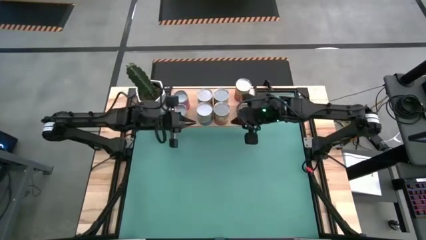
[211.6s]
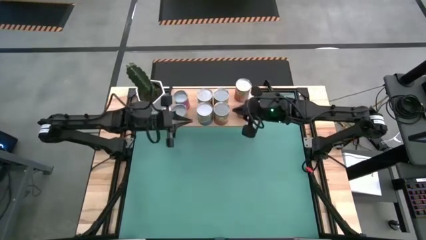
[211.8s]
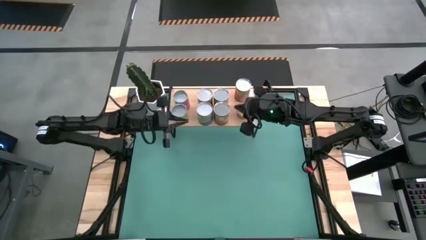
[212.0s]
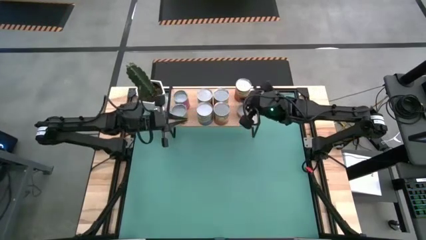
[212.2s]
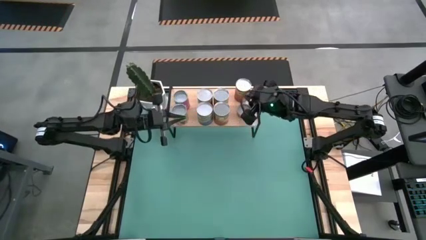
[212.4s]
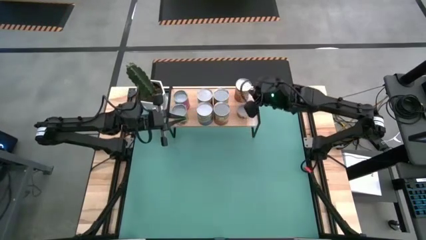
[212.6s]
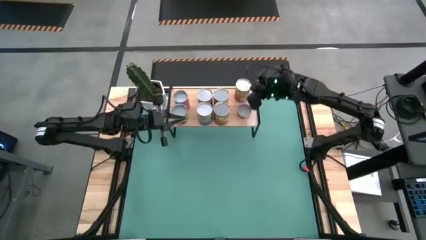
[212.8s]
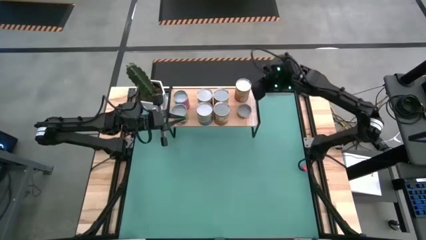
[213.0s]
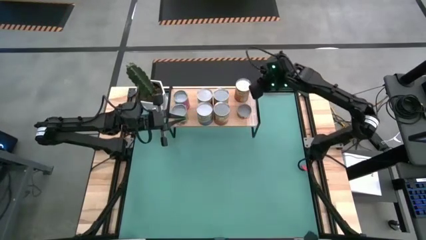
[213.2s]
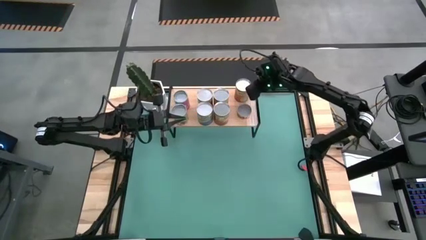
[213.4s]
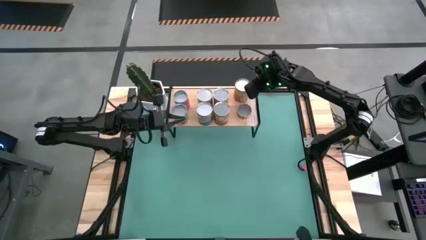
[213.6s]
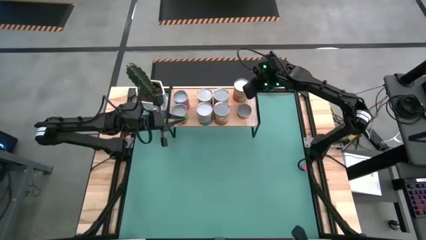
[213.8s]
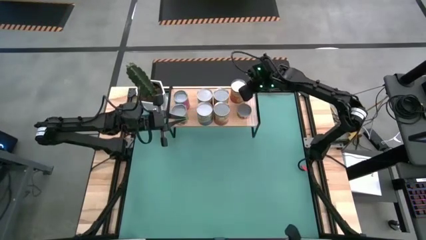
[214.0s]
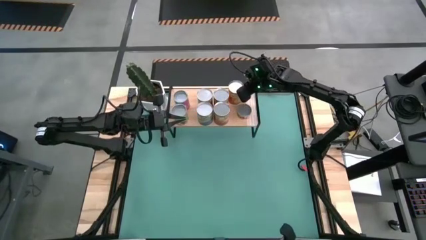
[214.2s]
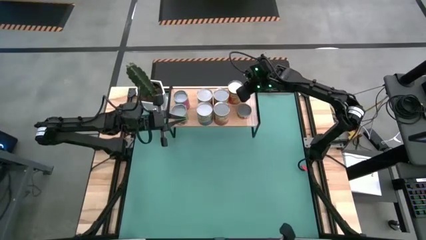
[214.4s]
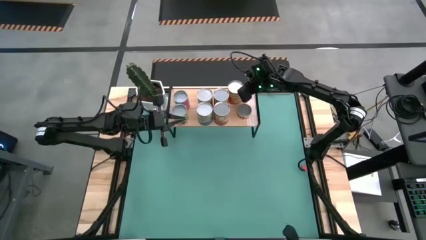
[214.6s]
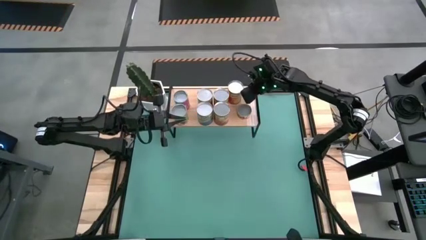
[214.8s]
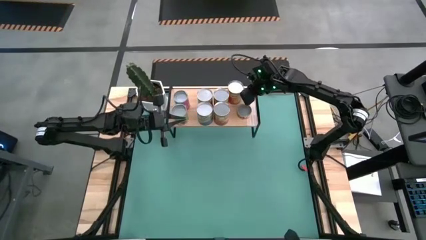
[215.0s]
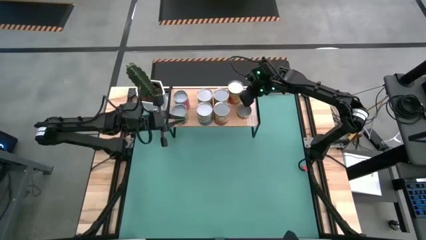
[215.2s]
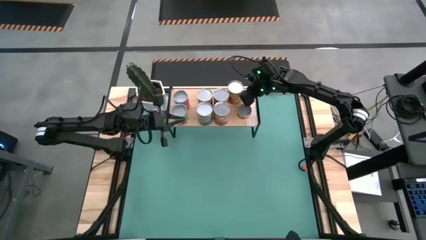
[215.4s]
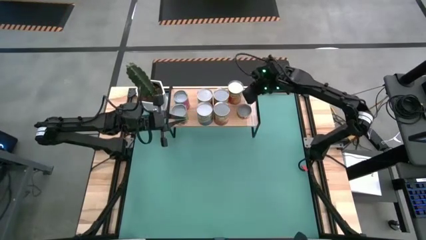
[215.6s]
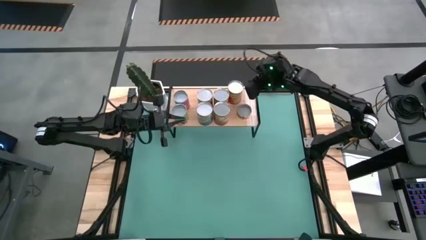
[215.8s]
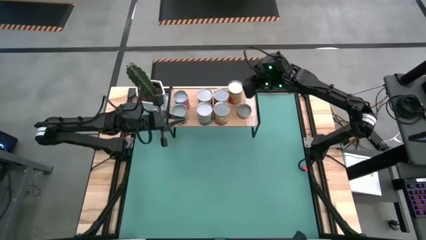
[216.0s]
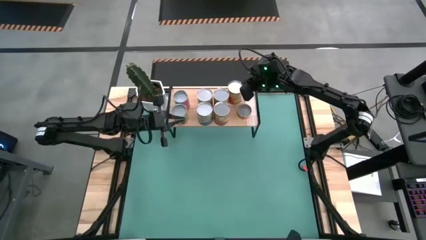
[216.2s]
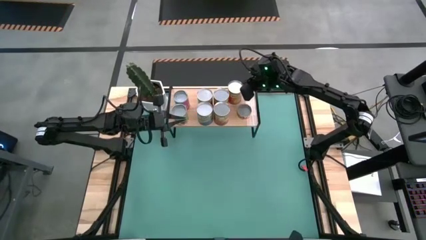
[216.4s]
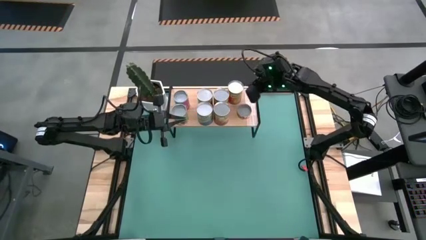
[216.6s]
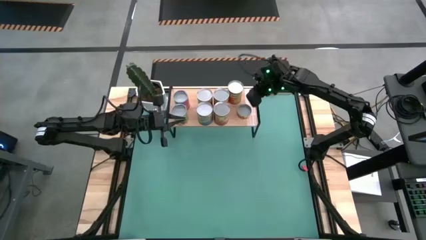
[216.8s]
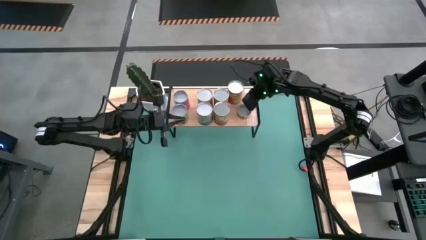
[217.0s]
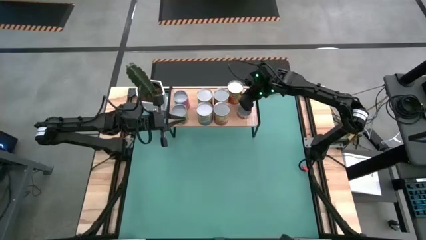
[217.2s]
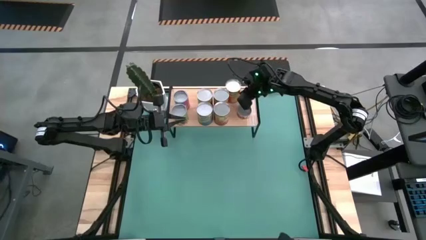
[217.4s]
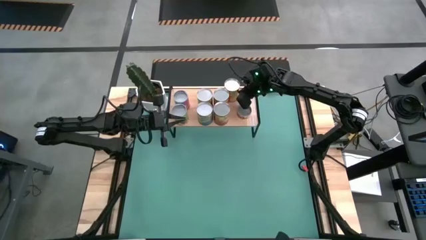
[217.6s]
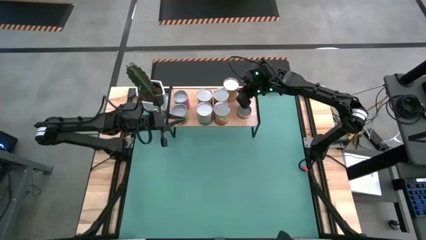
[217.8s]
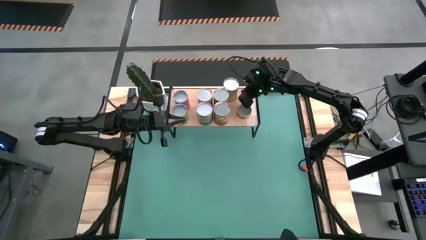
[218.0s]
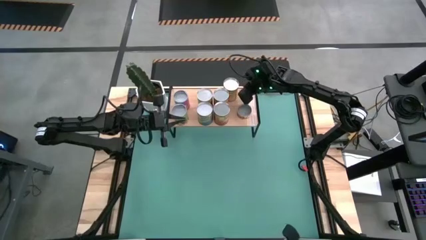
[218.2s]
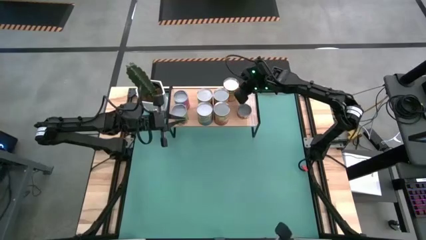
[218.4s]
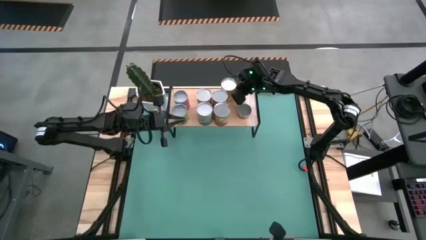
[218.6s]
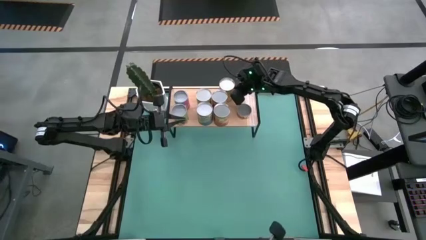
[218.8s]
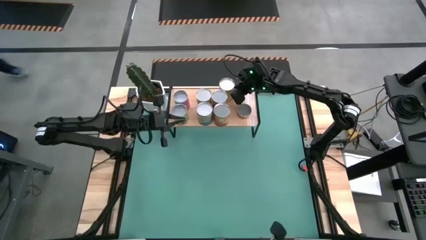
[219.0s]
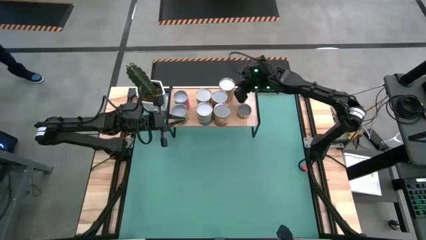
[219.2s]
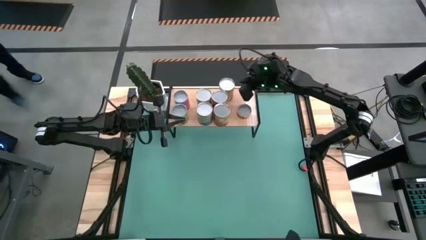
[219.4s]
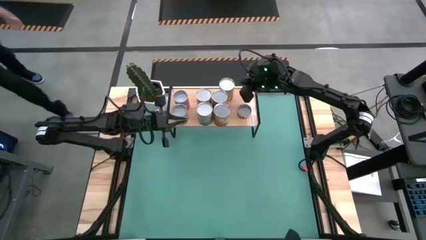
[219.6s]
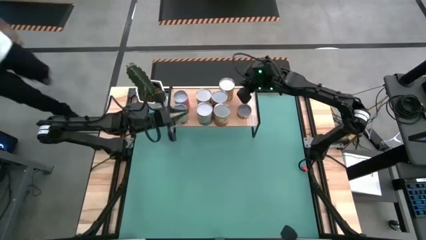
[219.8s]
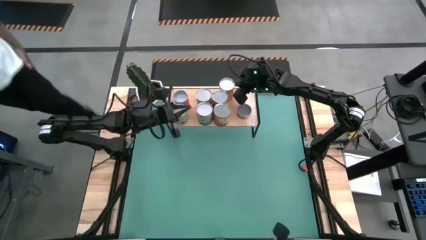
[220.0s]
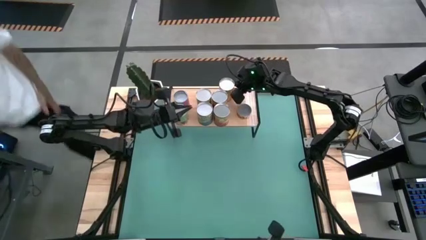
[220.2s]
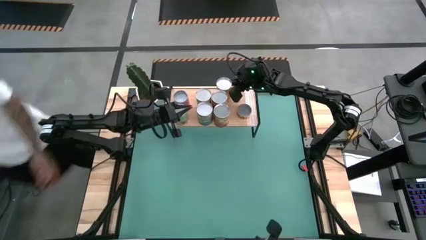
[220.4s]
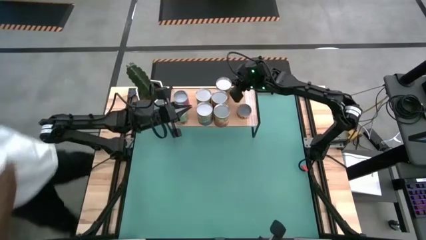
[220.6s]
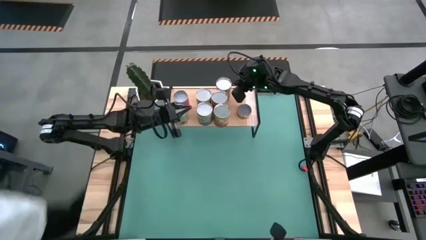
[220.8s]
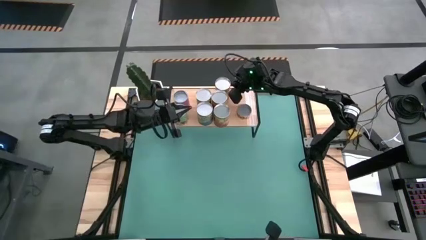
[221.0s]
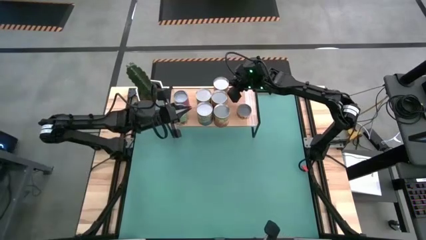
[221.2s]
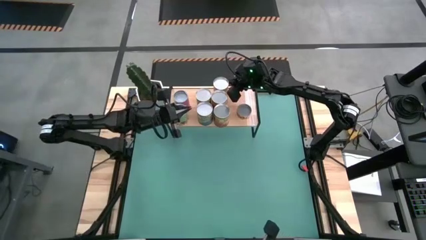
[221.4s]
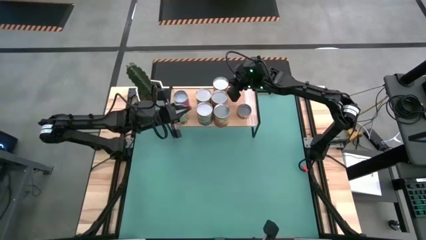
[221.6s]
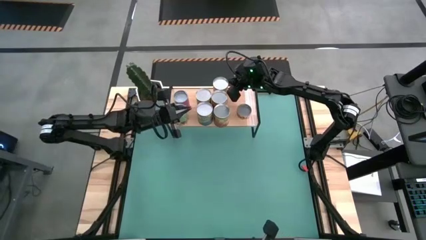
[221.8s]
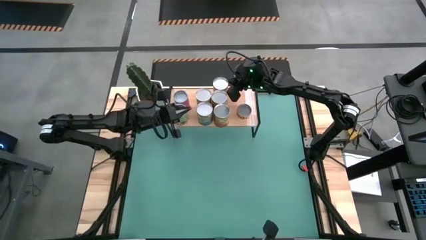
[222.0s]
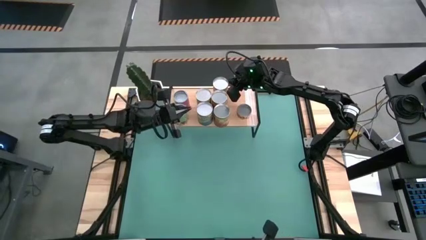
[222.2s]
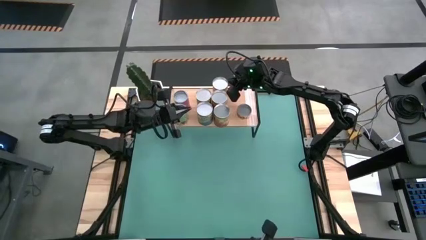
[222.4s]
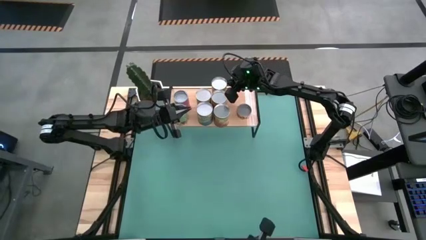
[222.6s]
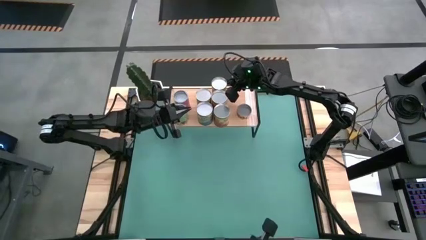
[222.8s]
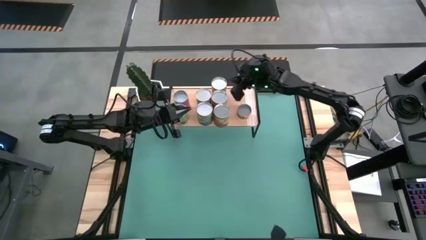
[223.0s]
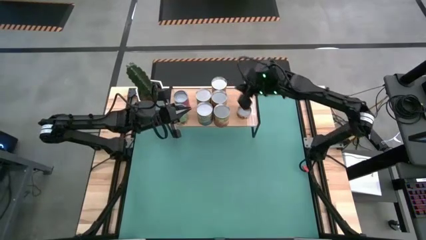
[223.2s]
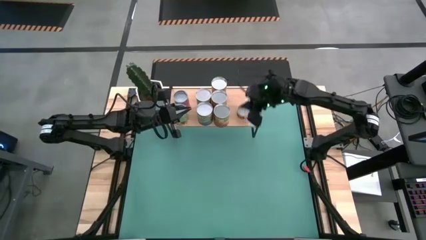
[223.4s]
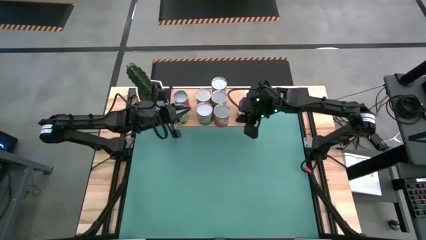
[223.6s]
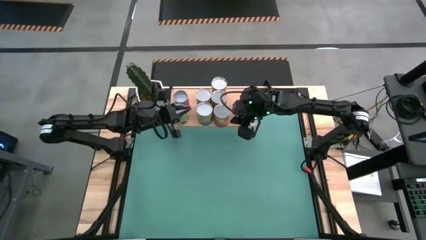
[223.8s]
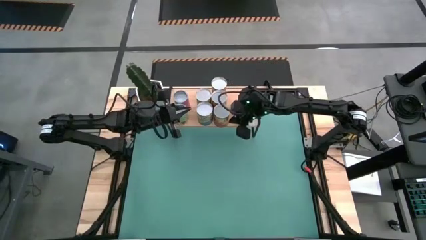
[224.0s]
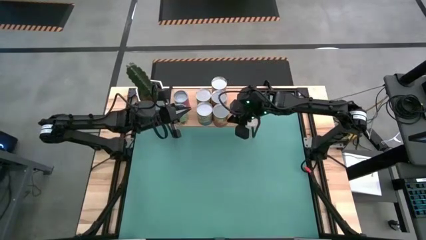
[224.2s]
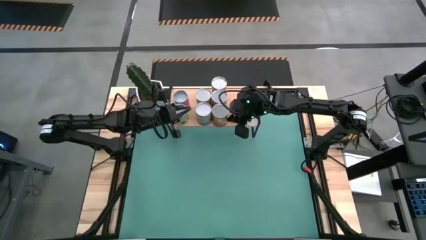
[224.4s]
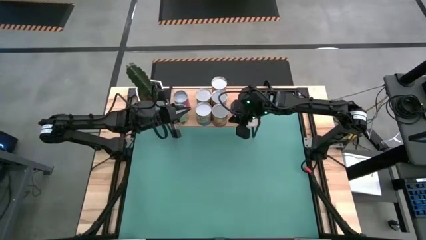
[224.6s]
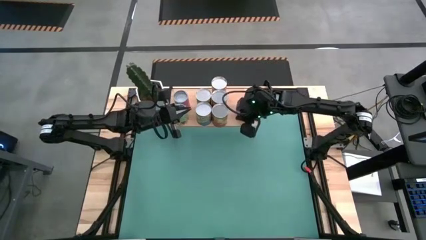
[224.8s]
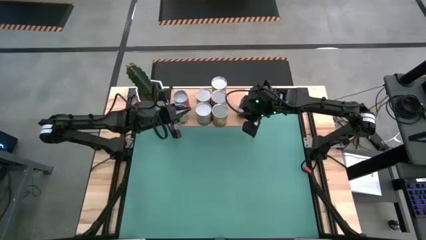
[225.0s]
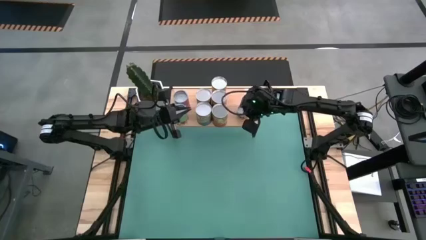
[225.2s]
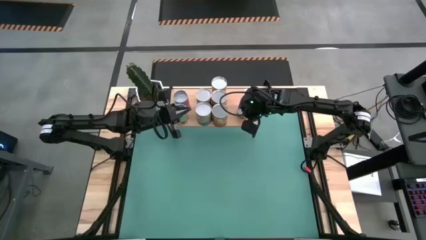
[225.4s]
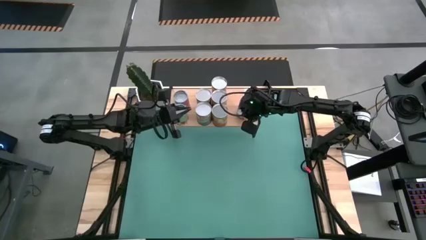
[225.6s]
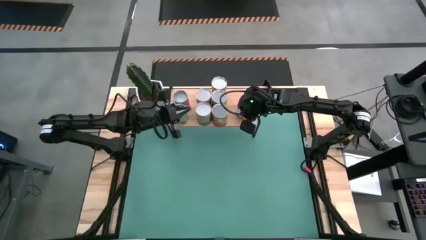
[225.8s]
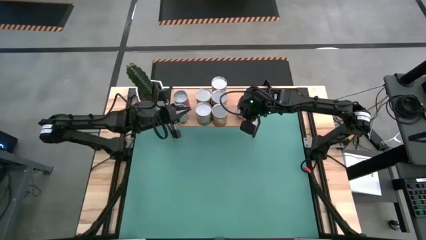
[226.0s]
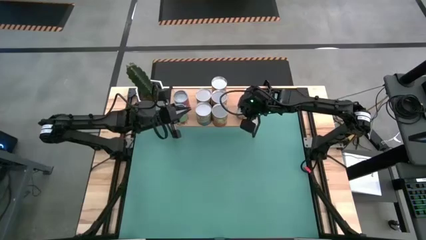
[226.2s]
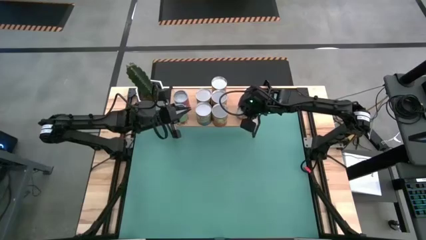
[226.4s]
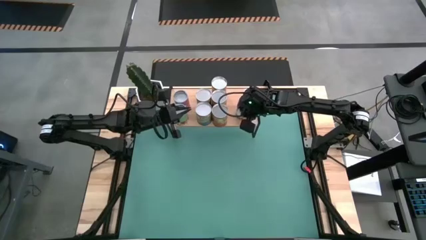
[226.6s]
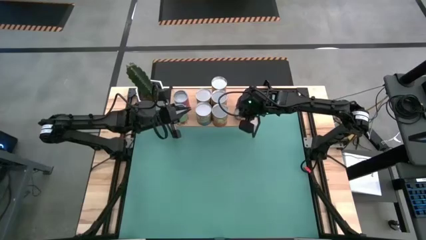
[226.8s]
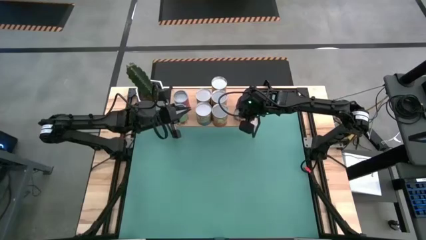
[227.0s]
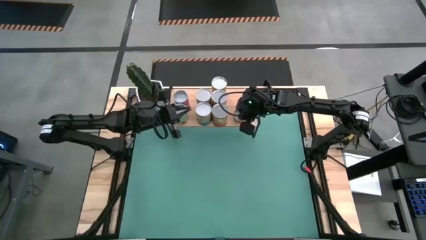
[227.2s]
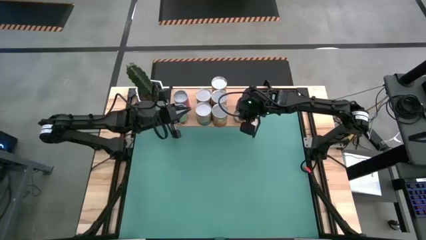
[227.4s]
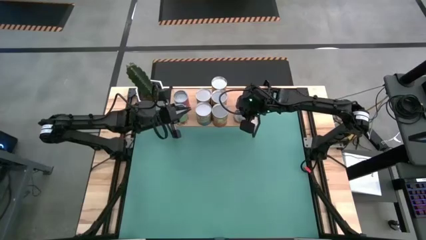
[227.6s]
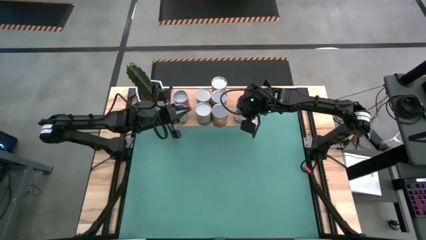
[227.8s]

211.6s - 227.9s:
Task: Pick and place cans onto a shelf
Adjust the canned goods on the shelf
